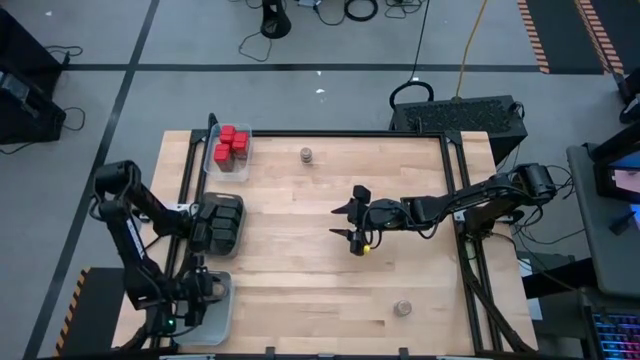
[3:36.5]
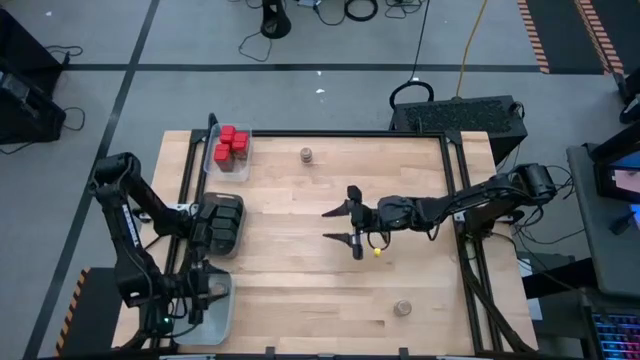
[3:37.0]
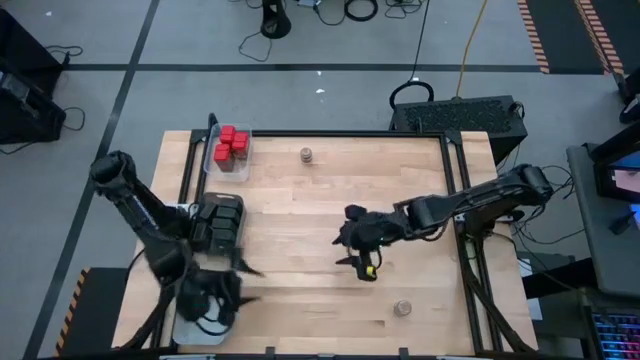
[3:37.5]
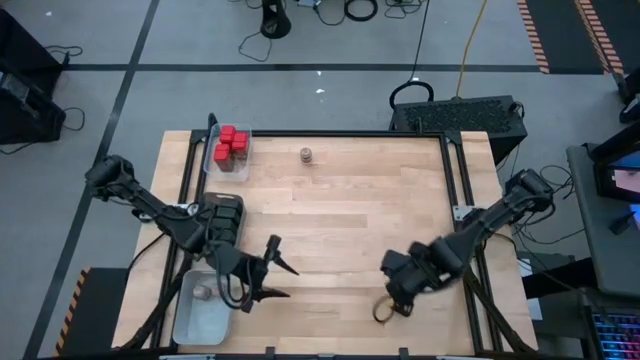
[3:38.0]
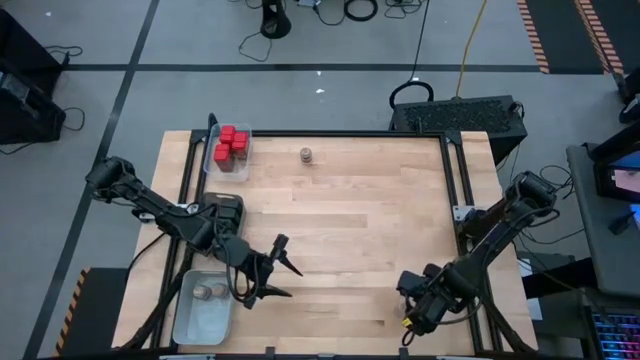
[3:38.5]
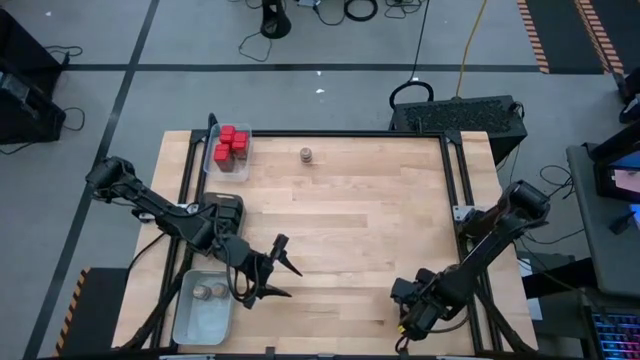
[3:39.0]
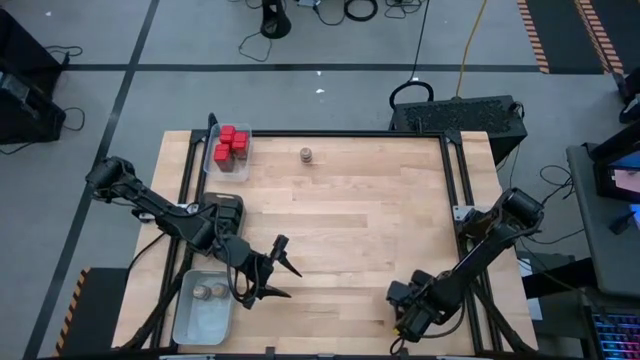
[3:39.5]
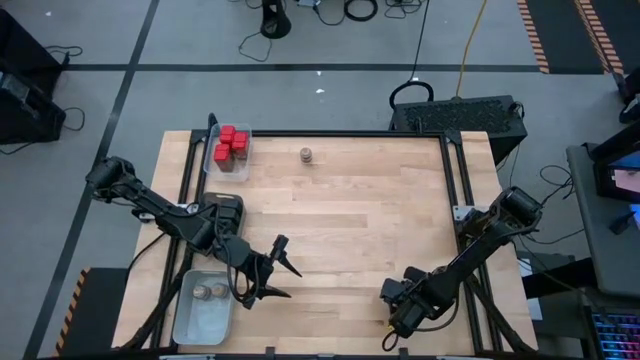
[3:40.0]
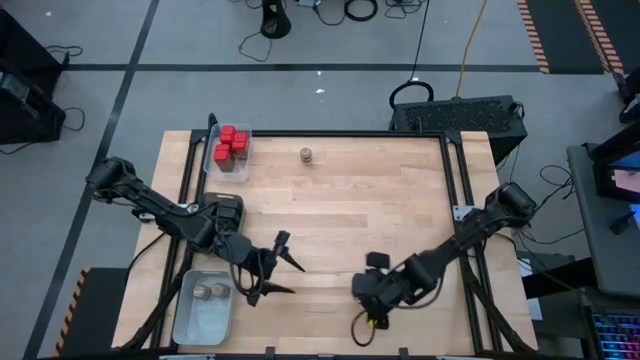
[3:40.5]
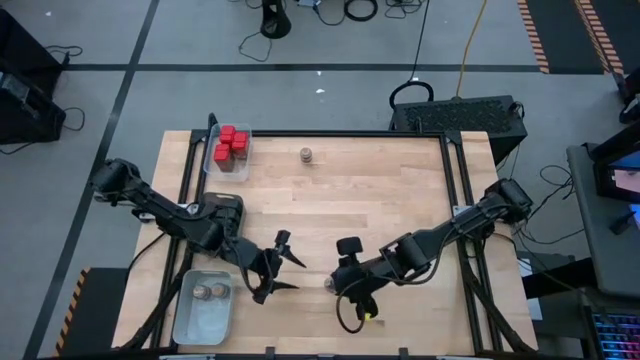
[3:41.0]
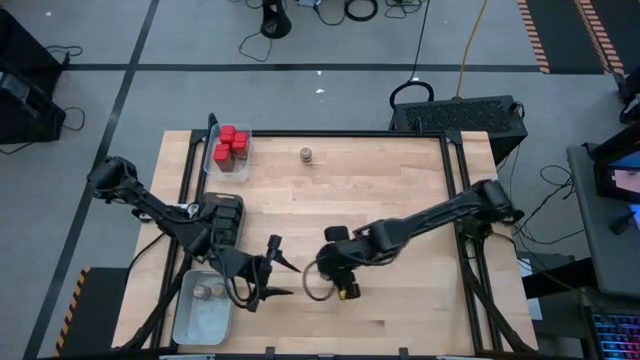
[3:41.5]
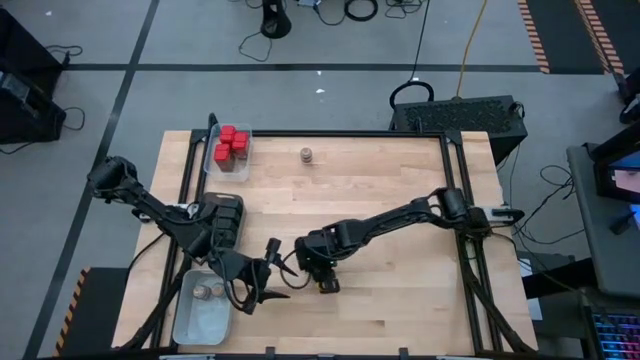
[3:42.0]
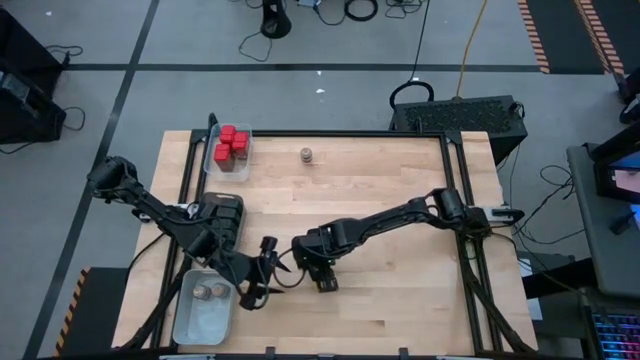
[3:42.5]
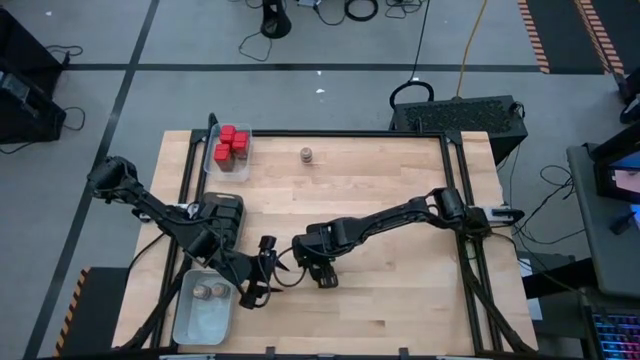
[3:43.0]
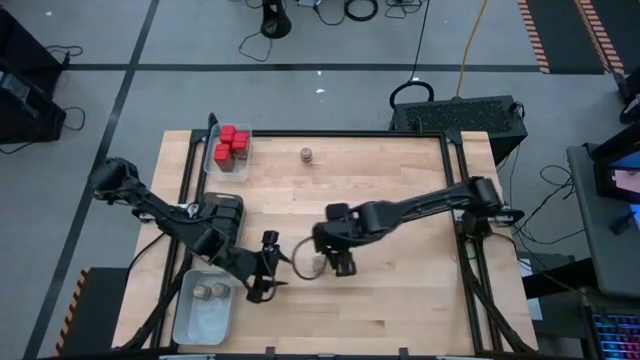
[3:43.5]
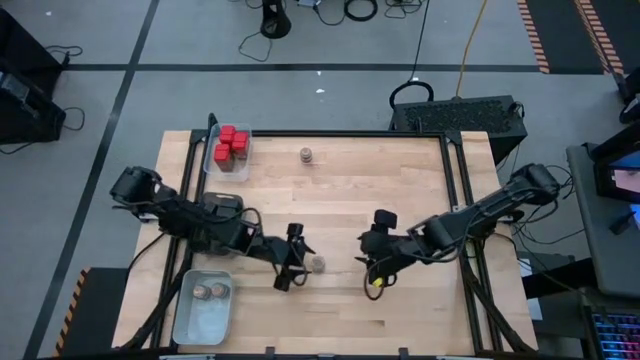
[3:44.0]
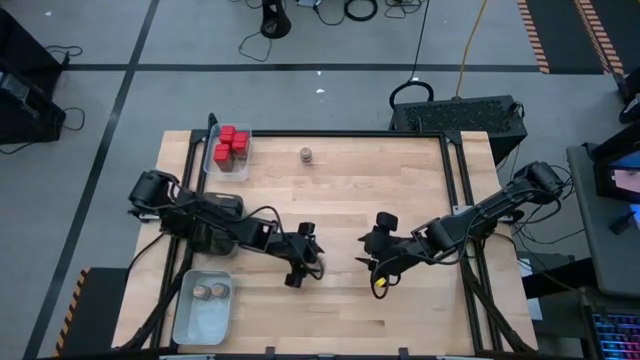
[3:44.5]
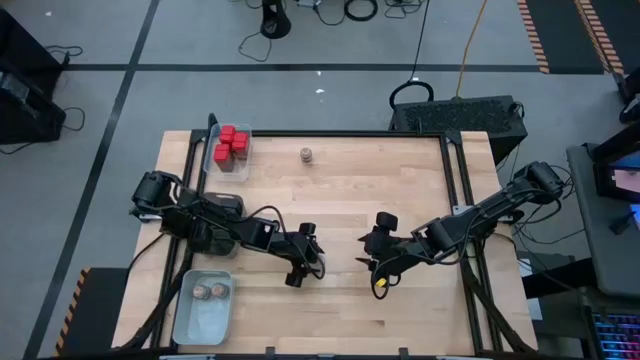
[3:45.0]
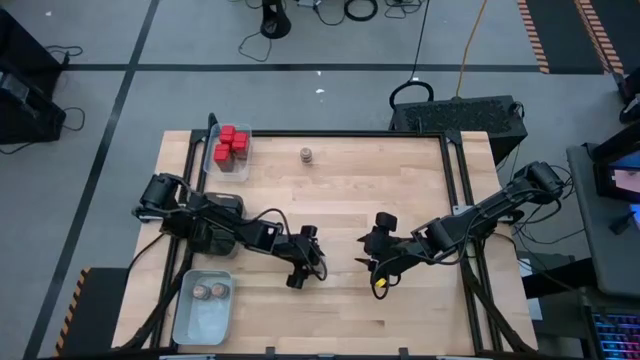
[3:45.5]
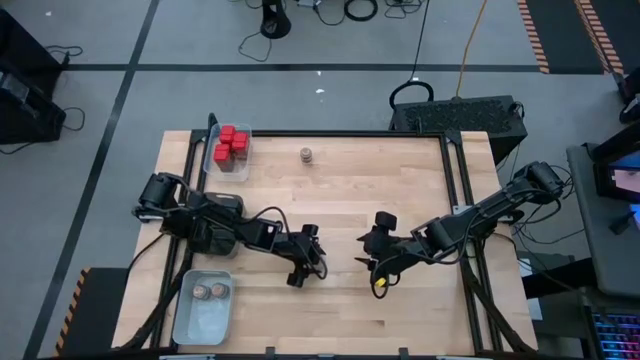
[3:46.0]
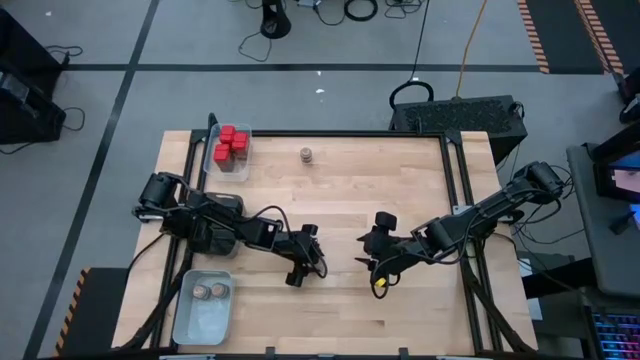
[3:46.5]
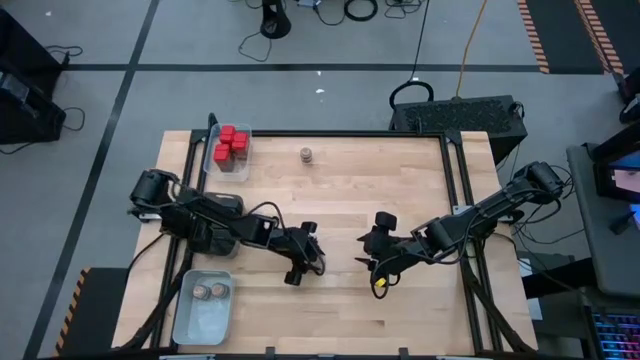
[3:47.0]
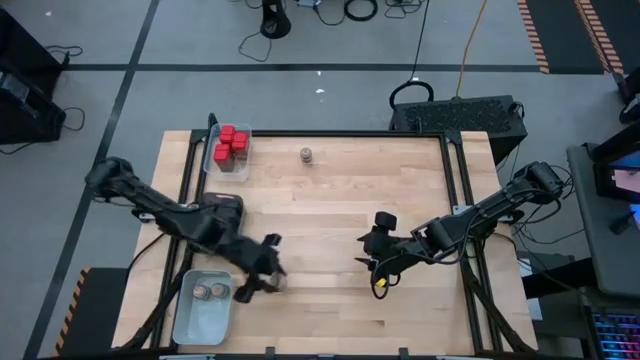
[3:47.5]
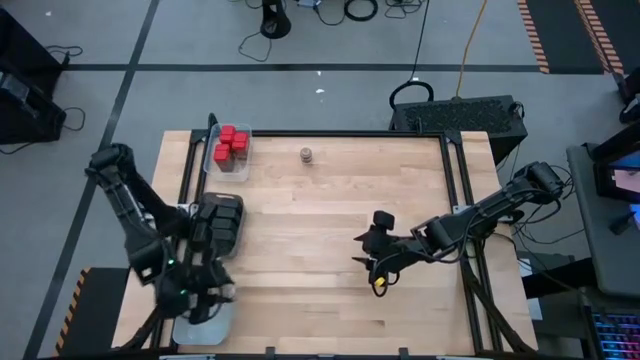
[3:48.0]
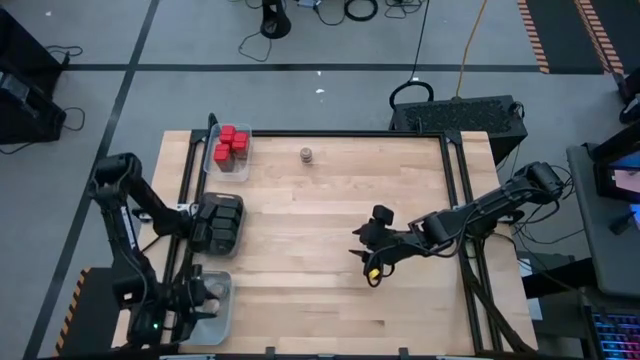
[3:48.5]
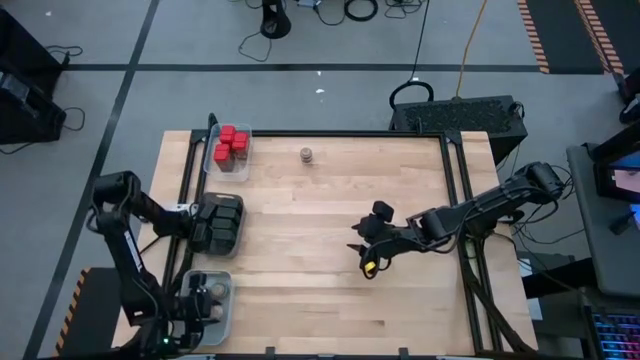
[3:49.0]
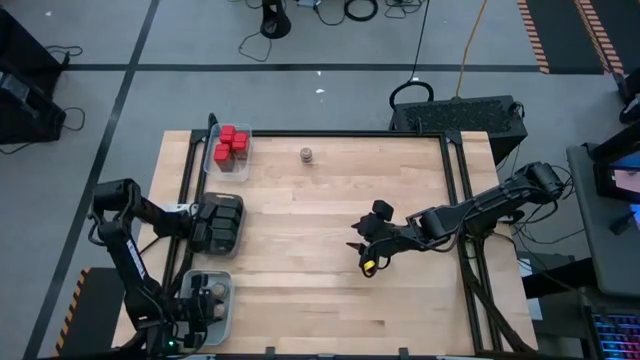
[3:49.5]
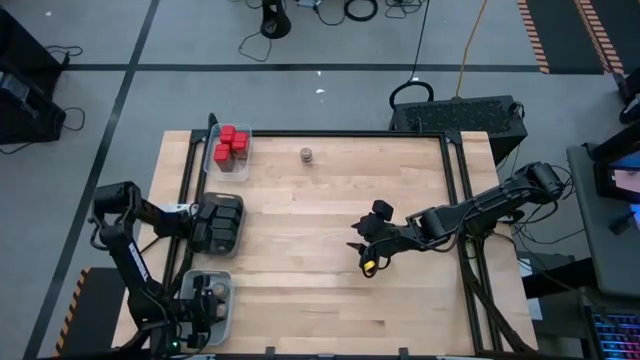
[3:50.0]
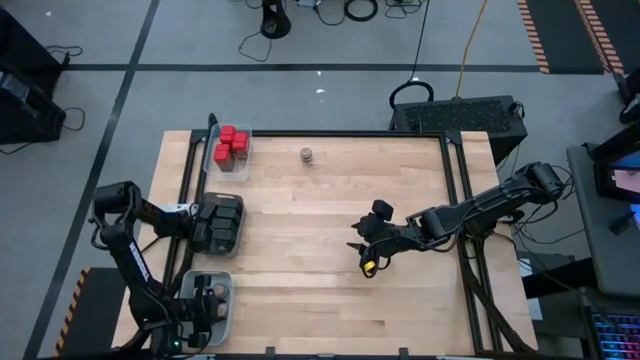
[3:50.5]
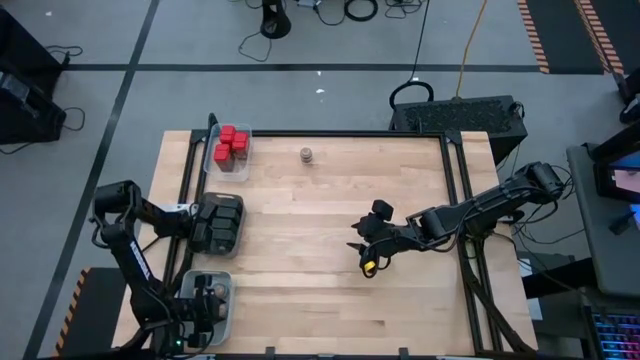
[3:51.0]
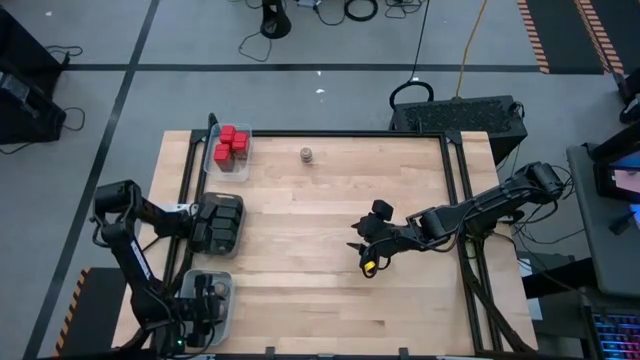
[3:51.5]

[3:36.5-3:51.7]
Task: Sort spices by type
Put the brown seasoning bottle into the gray bin

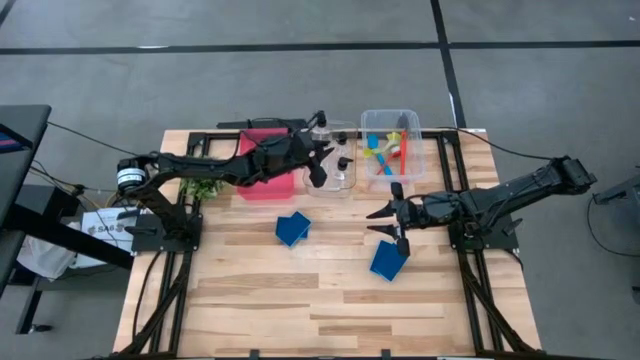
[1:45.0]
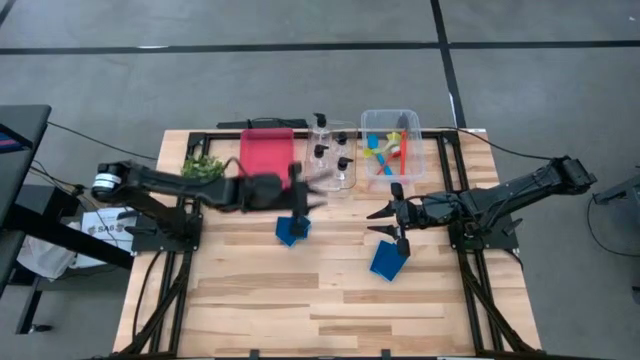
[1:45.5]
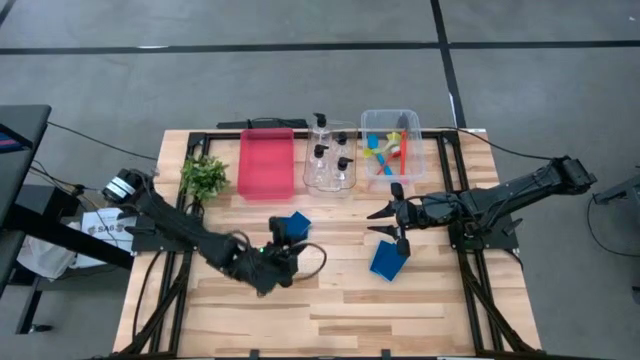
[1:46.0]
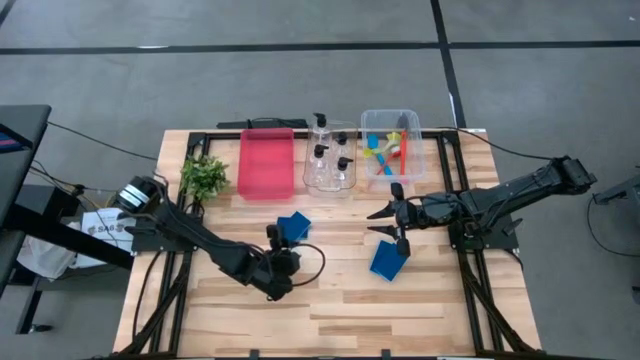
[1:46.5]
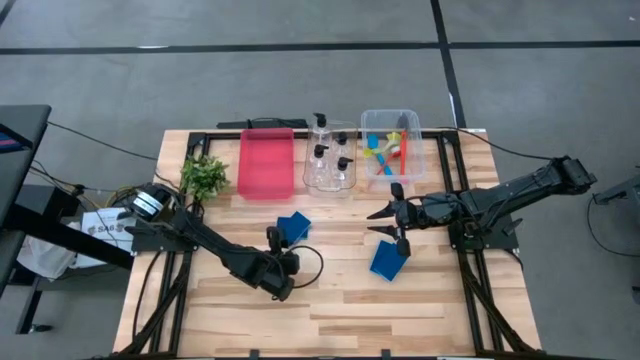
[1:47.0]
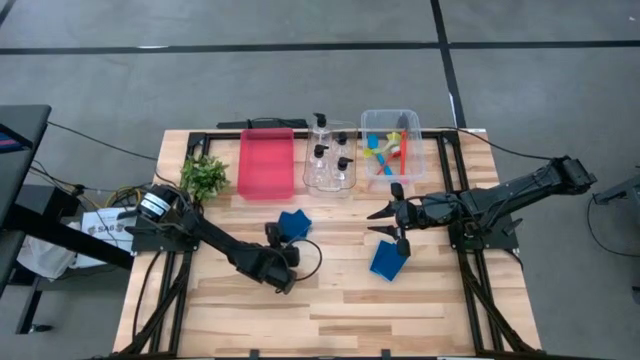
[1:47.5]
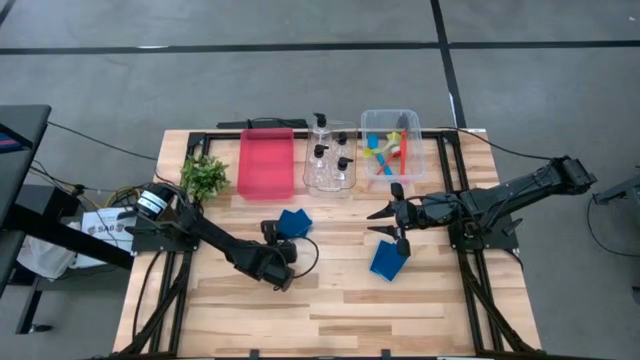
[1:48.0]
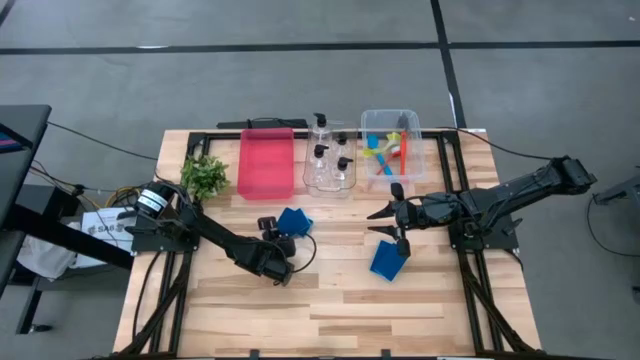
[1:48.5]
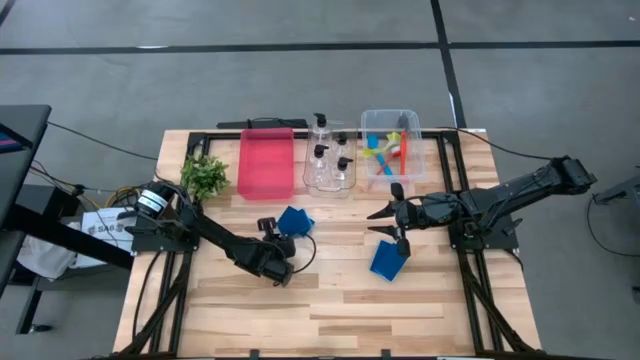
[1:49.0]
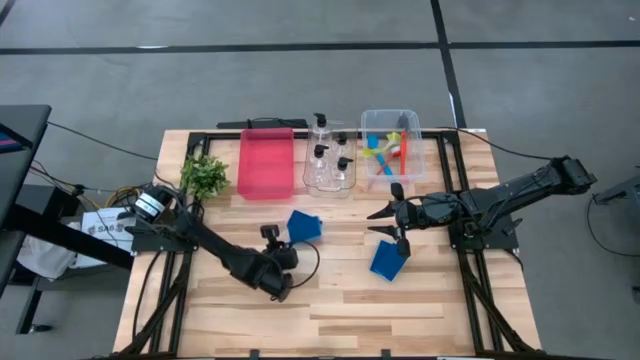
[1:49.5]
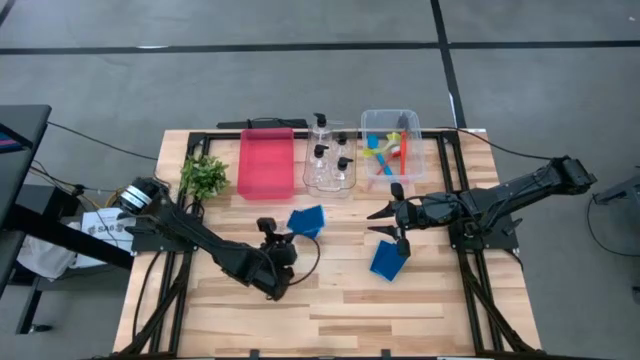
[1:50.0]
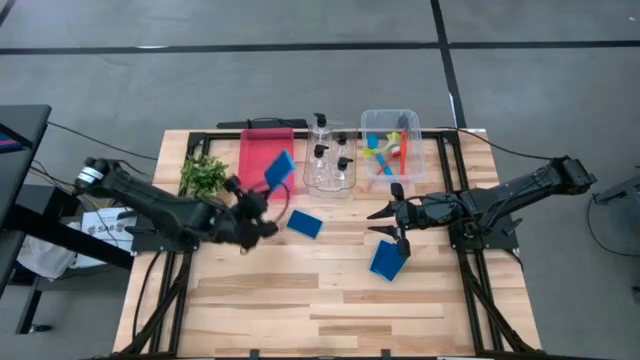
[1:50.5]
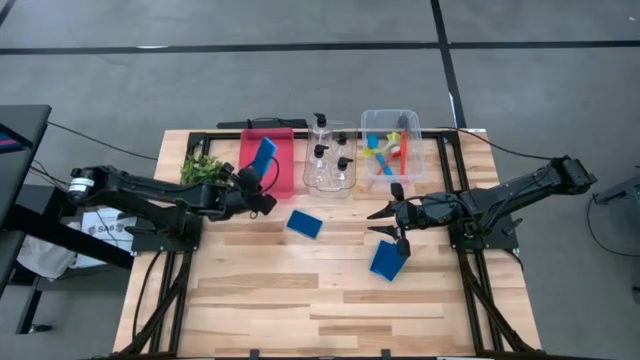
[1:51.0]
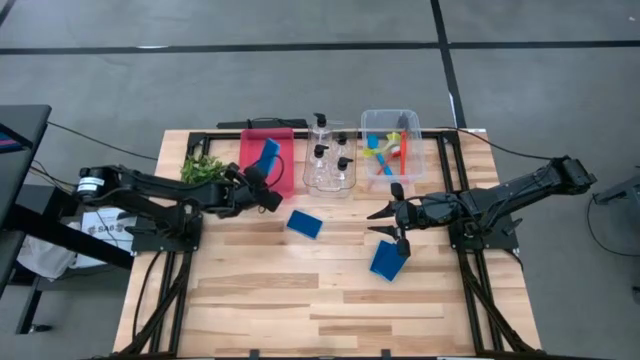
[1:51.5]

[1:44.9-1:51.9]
Task: Pick & Place Kitchen Sink Supplies
Put the blue sponge wipe into the red transparent bin
